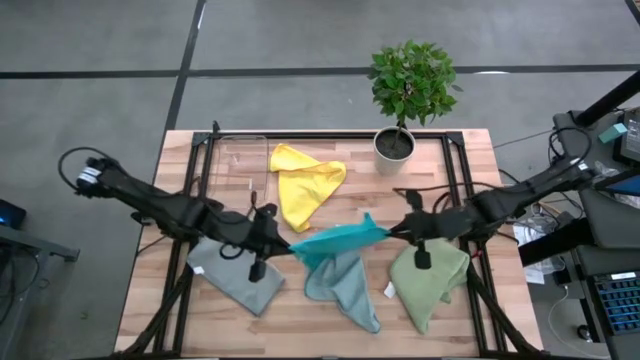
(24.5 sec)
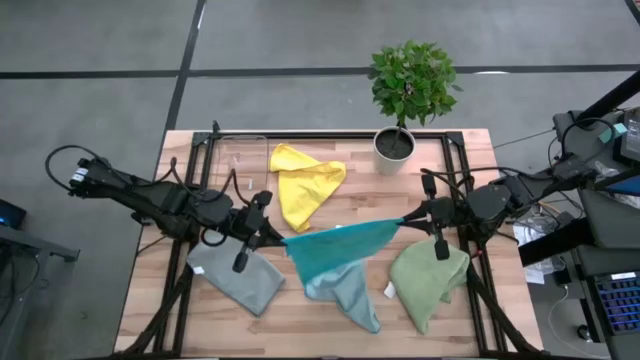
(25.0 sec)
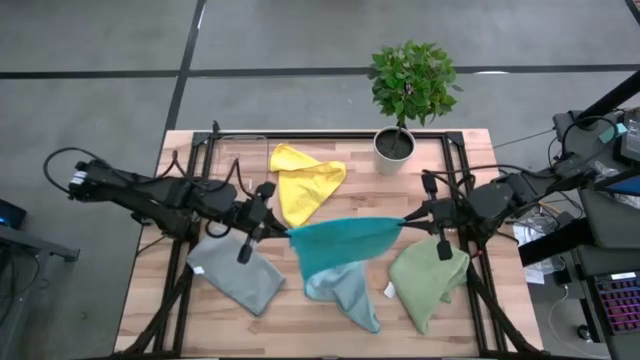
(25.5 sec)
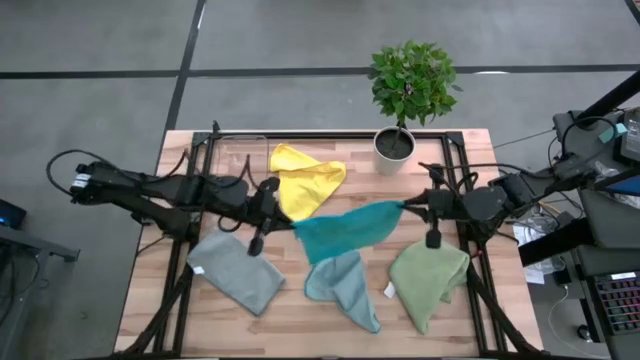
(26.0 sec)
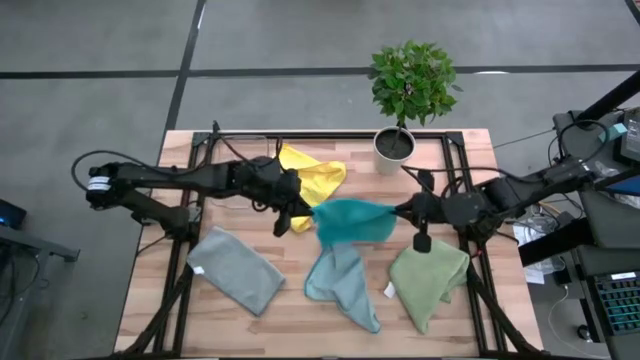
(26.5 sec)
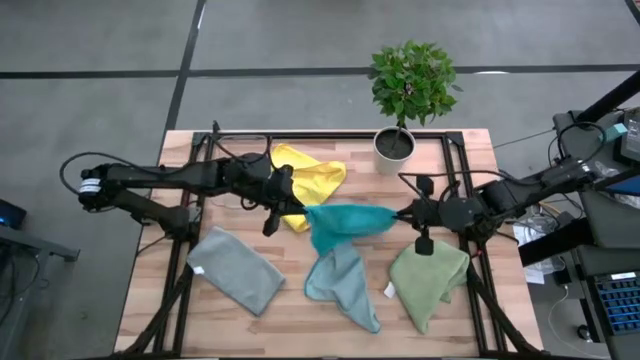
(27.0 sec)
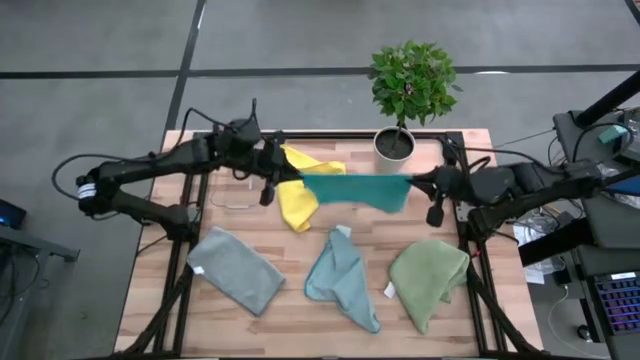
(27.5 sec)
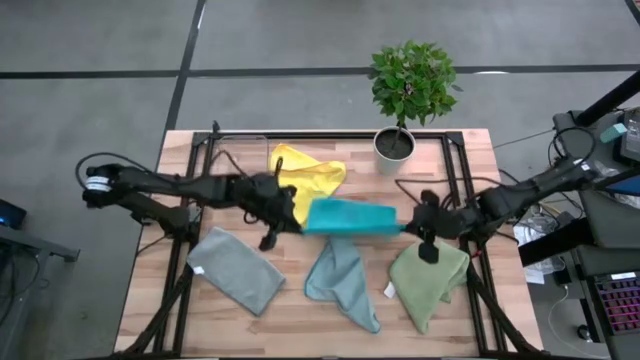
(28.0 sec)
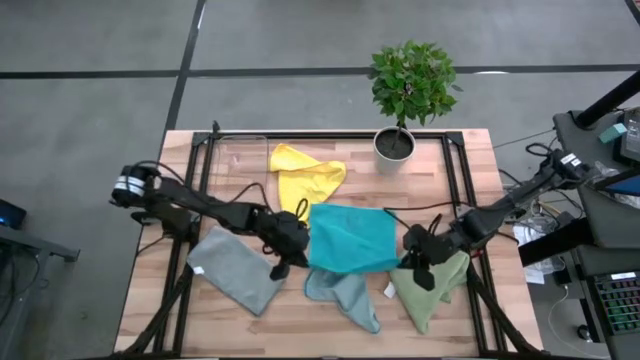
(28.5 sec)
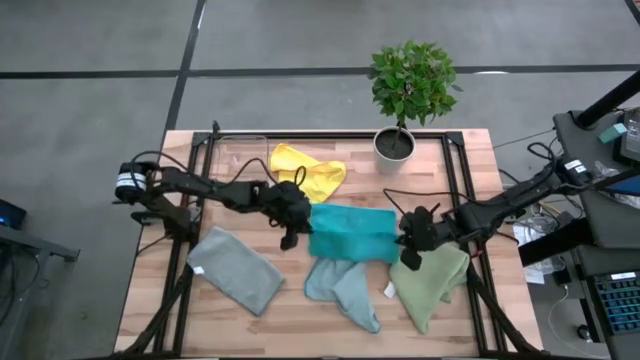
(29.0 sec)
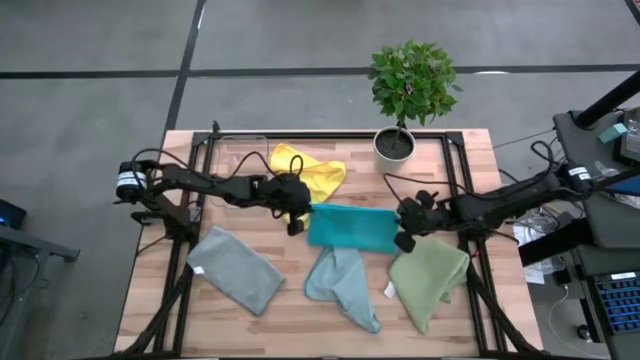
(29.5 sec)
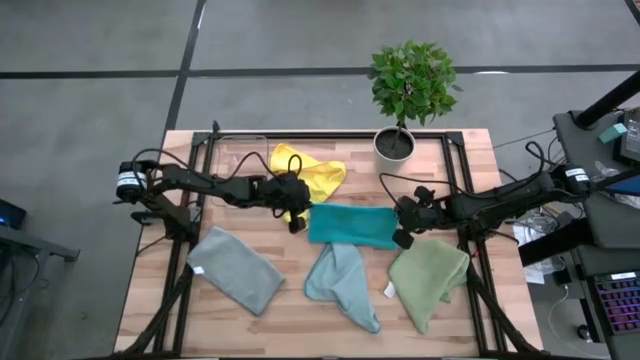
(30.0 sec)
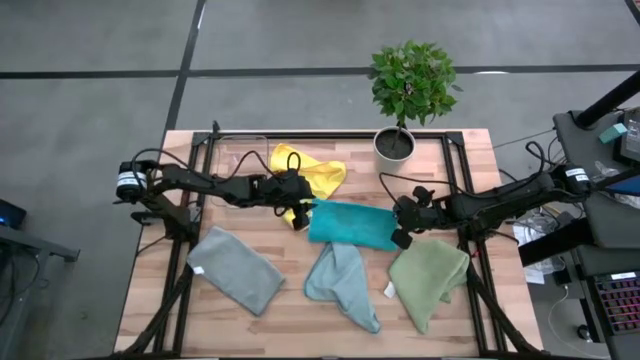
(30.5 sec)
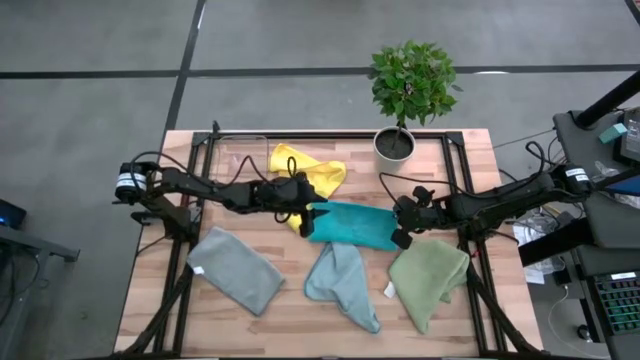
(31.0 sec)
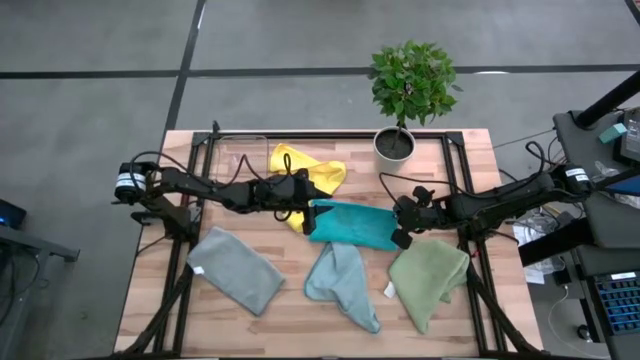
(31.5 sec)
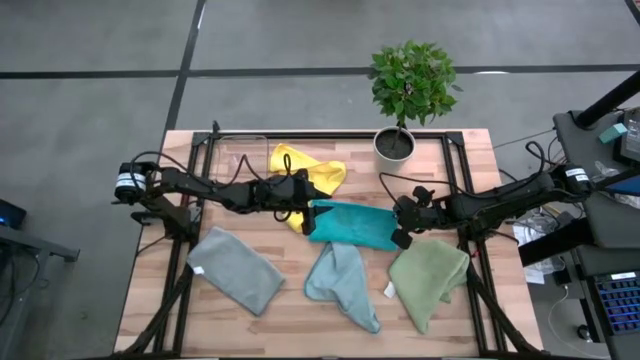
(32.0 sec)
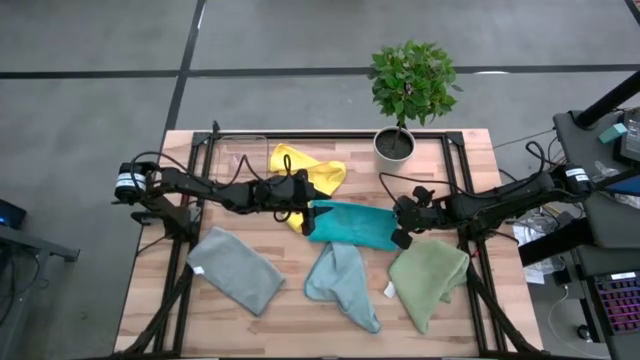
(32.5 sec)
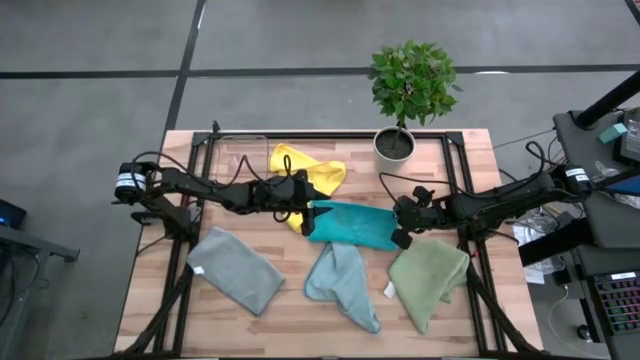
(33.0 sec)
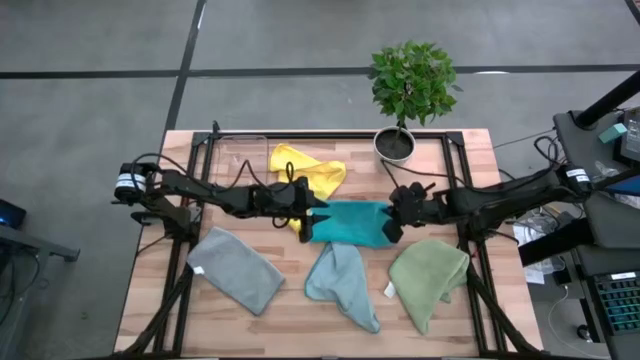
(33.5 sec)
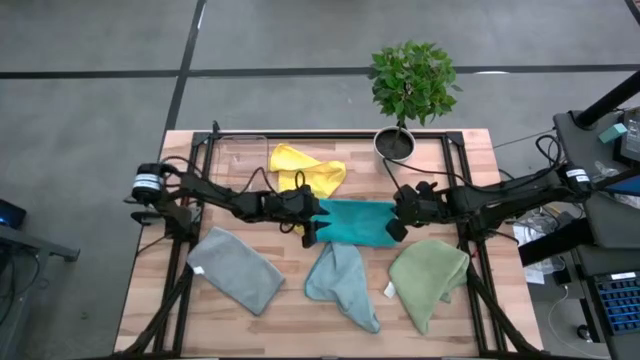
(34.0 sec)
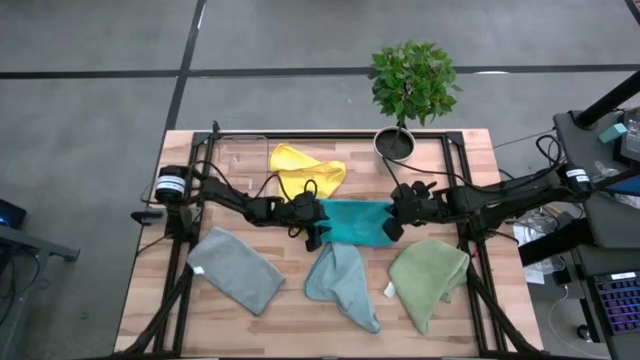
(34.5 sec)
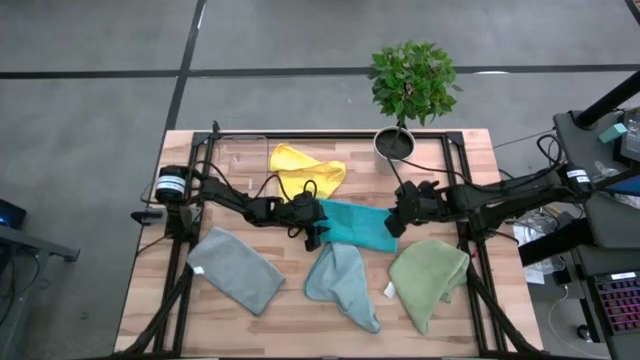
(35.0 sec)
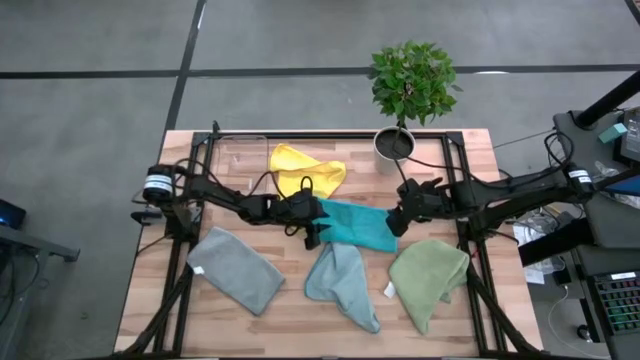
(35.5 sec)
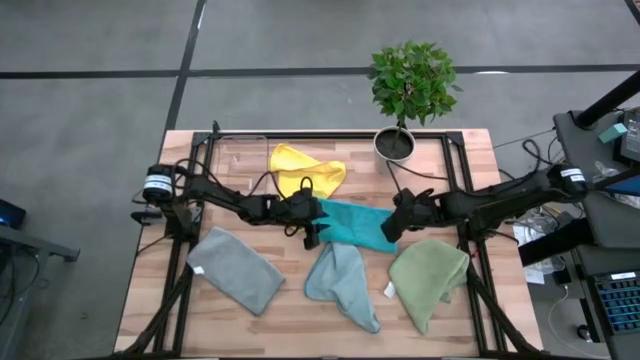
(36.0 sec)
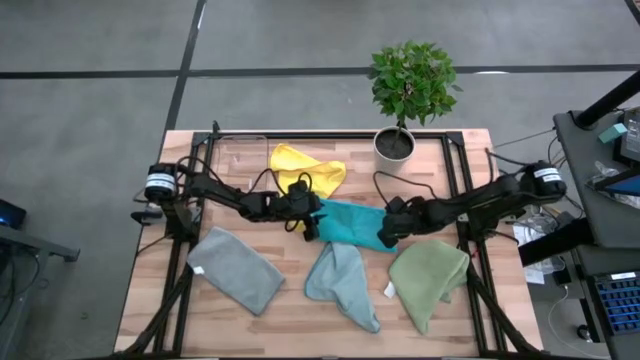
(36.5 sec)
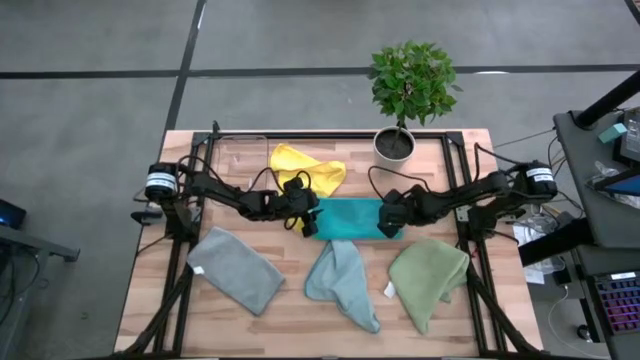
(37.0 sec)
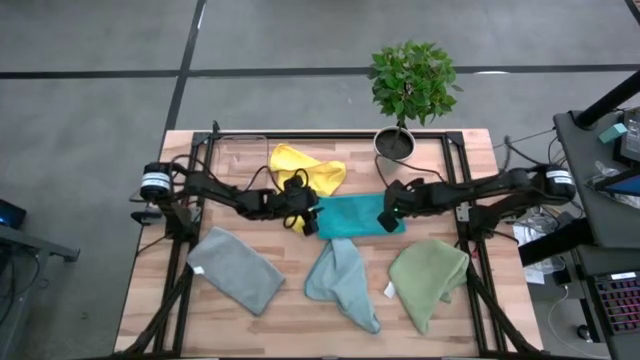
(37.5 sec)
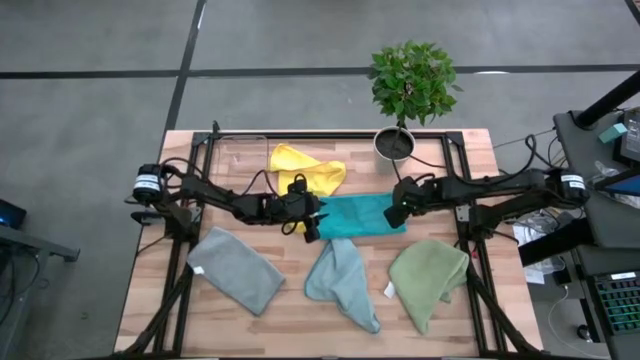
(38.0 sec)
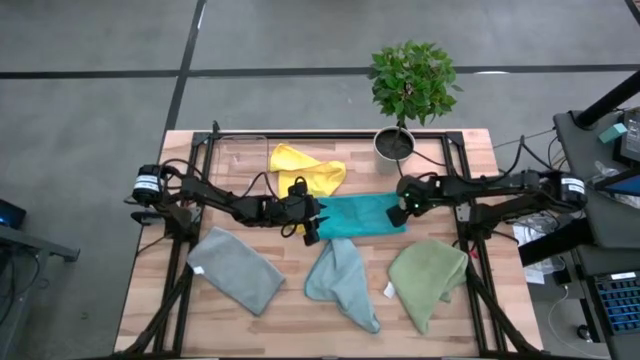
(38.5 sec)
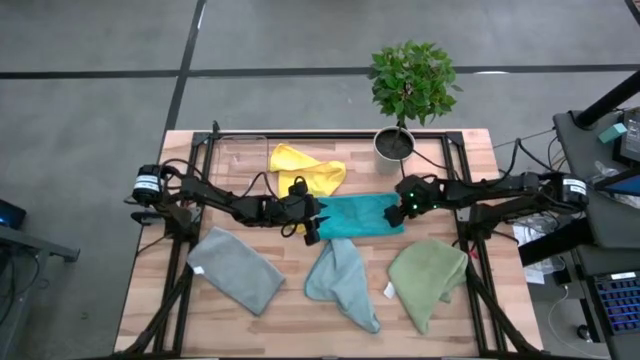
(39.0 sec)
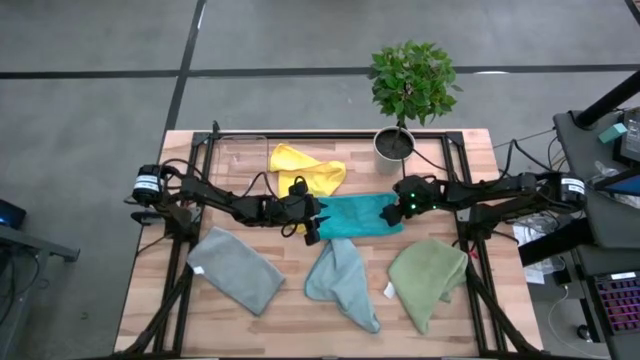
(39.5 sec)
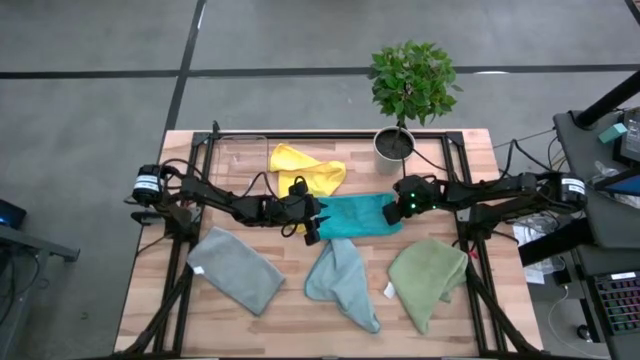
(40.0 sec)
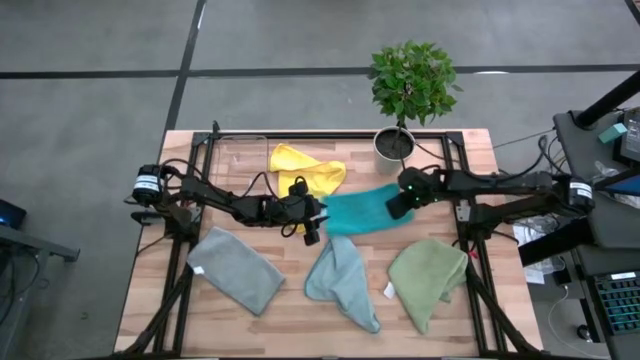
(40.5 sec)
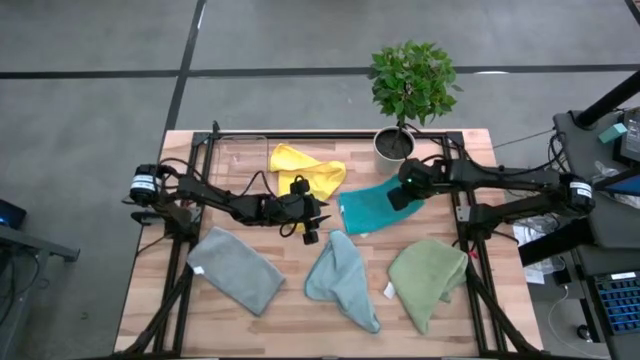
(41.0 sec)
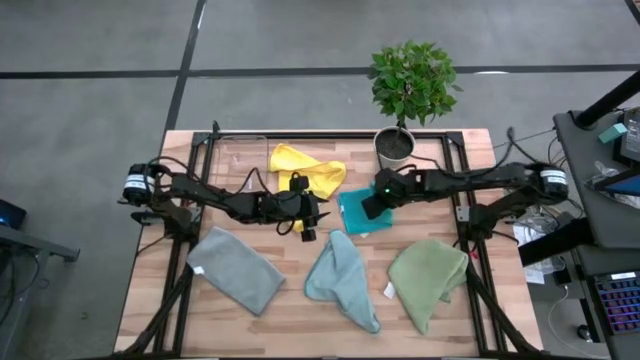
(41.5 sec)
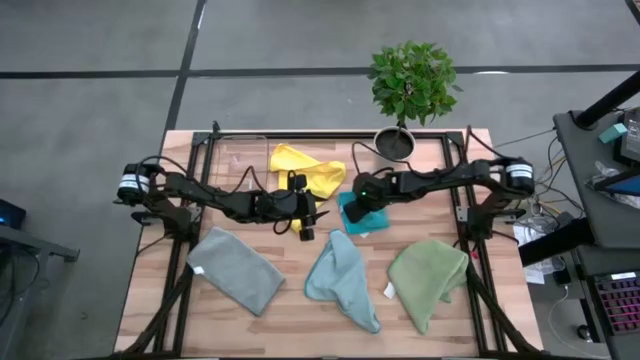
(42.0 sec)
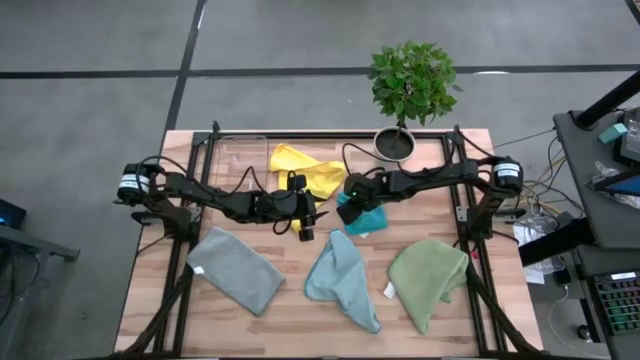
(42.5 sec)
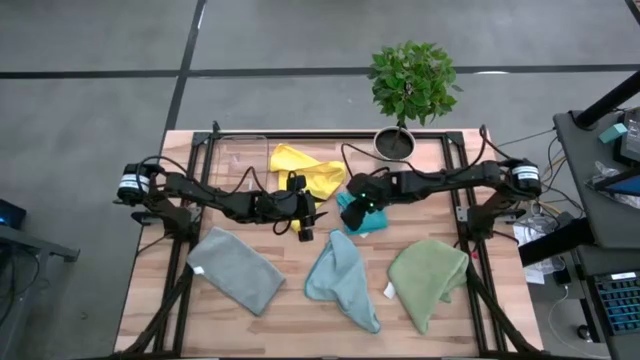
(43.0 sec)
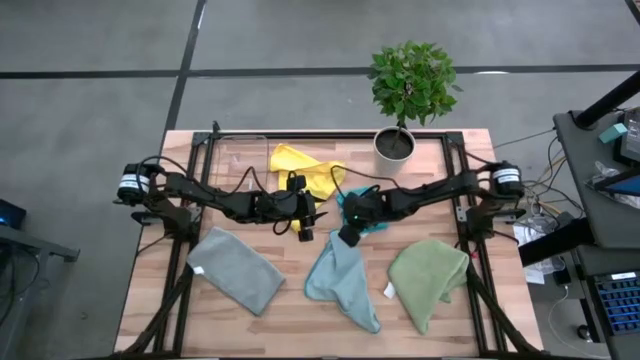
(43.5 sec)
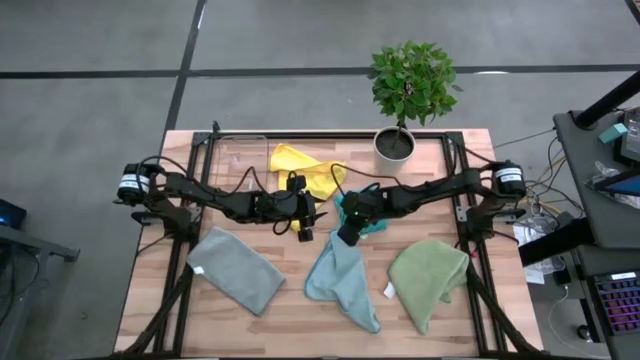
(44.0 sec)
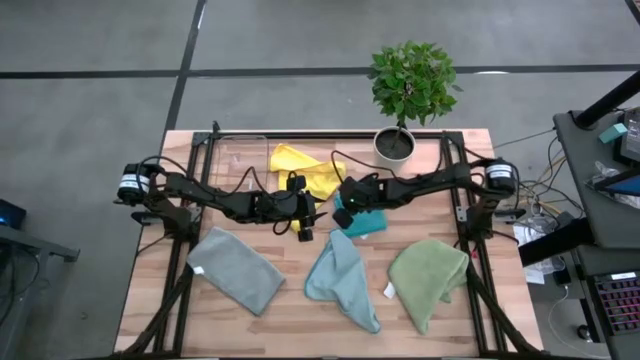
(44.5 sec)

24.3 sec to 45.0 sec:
Task: Fold microfiber towels
Fold the blue microfiber towel
